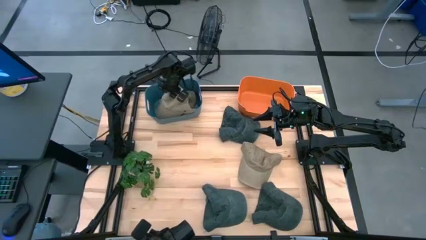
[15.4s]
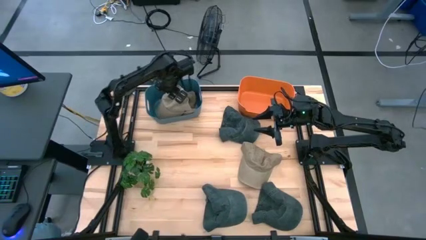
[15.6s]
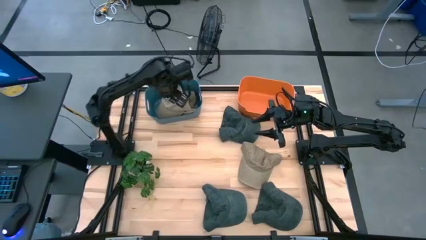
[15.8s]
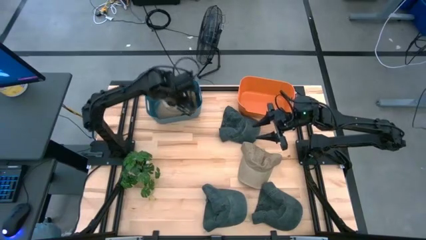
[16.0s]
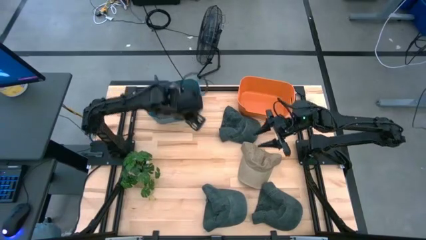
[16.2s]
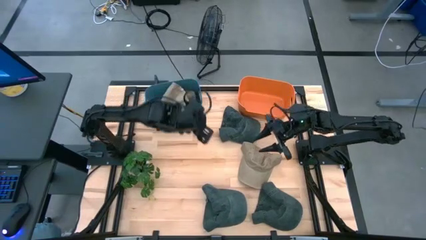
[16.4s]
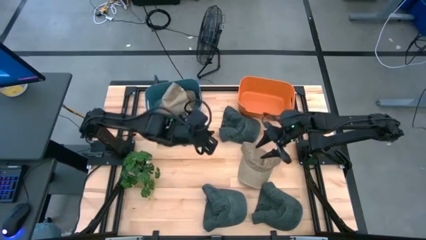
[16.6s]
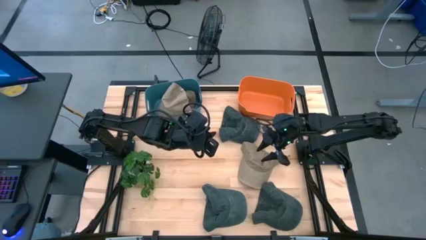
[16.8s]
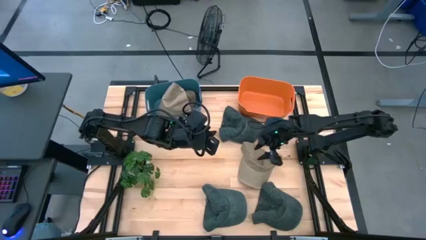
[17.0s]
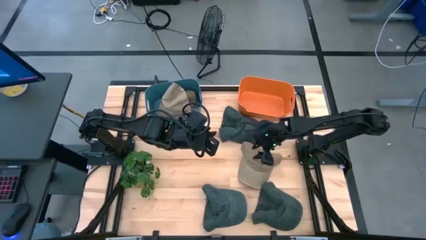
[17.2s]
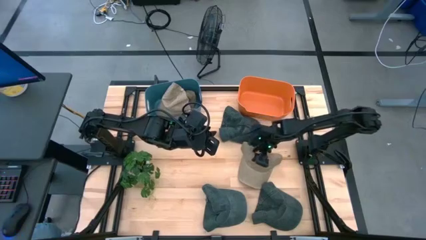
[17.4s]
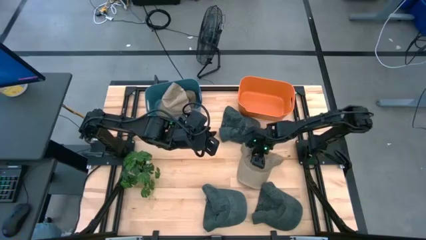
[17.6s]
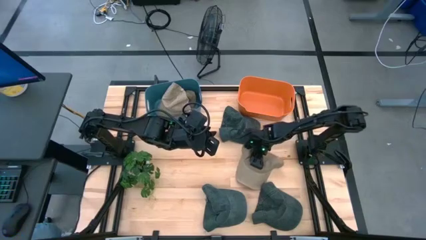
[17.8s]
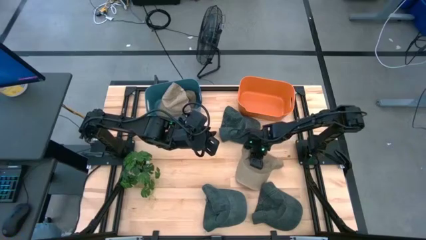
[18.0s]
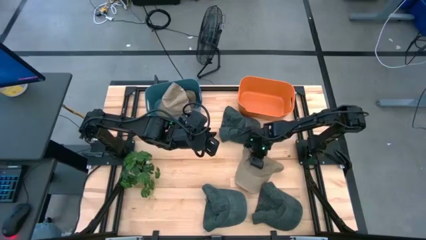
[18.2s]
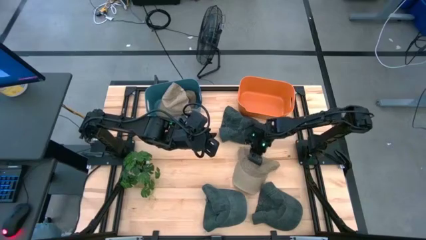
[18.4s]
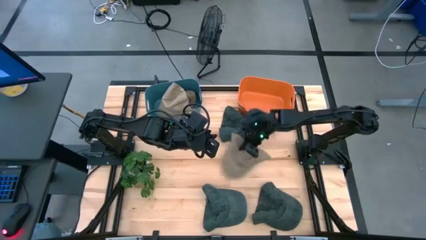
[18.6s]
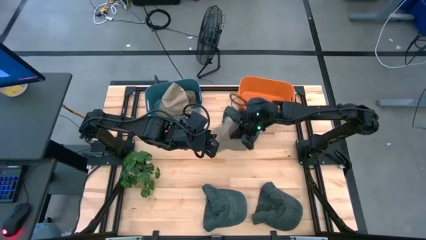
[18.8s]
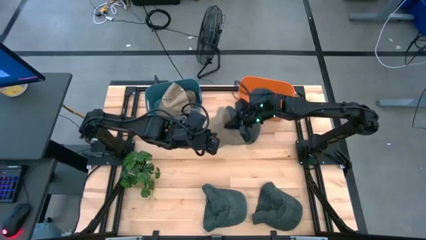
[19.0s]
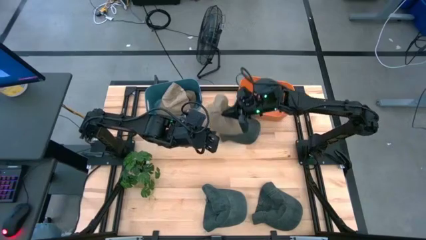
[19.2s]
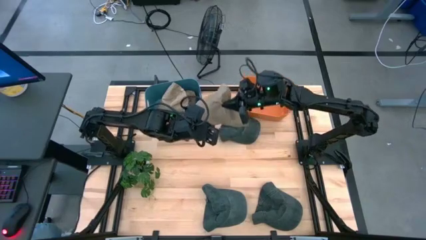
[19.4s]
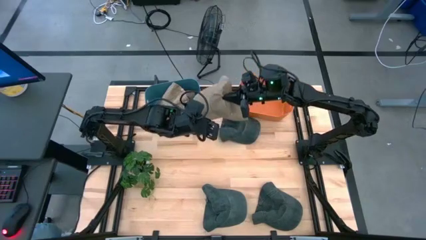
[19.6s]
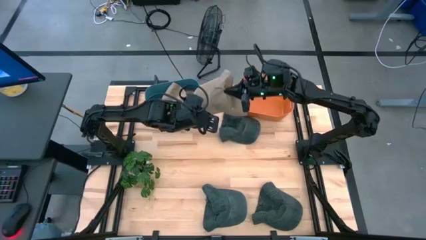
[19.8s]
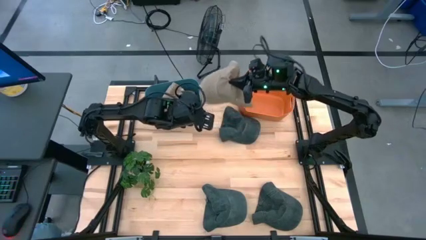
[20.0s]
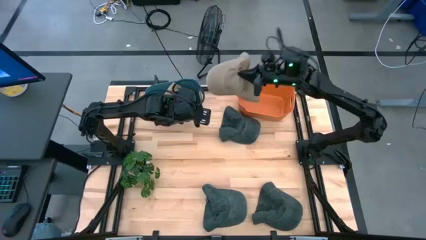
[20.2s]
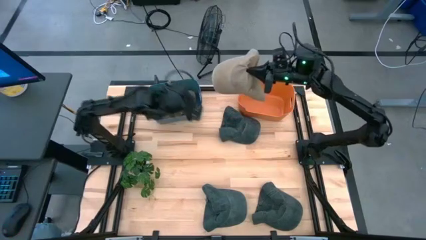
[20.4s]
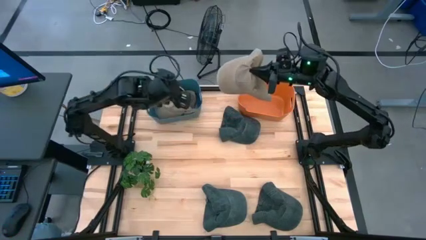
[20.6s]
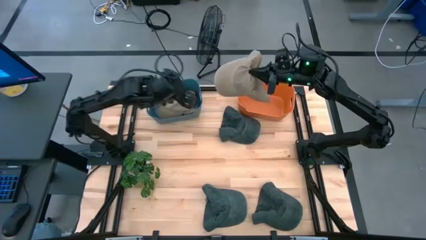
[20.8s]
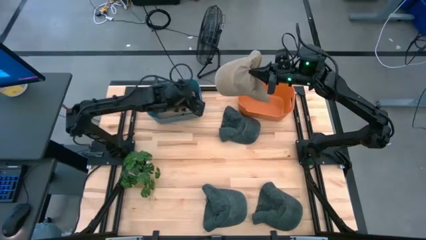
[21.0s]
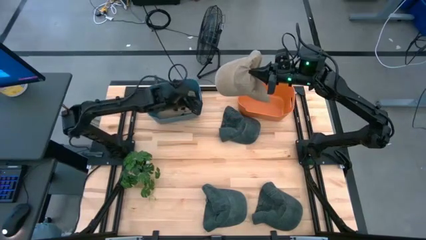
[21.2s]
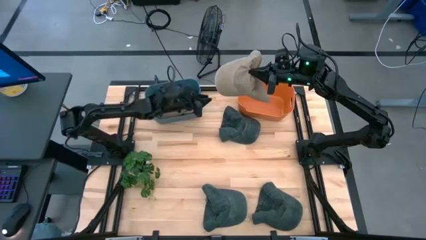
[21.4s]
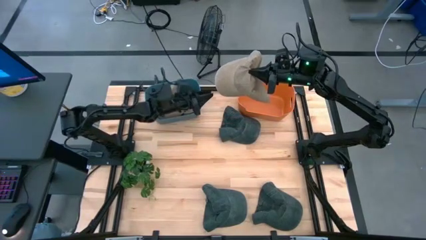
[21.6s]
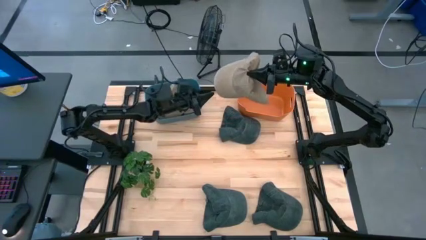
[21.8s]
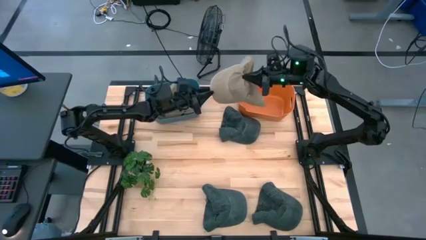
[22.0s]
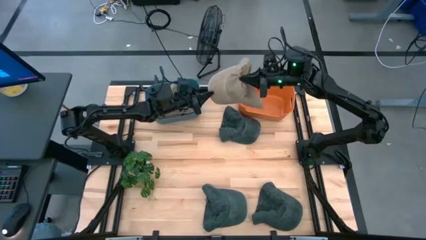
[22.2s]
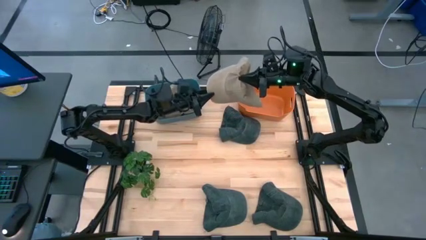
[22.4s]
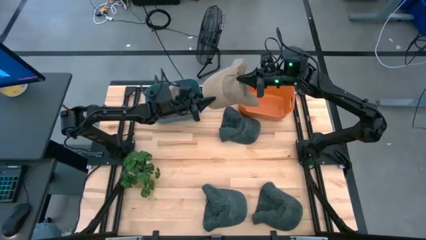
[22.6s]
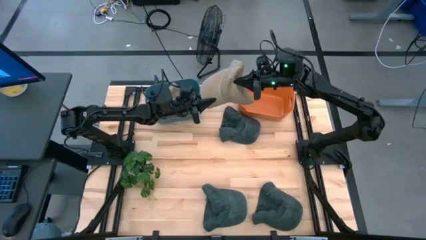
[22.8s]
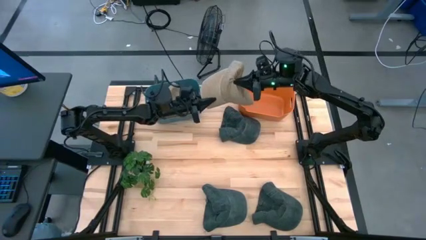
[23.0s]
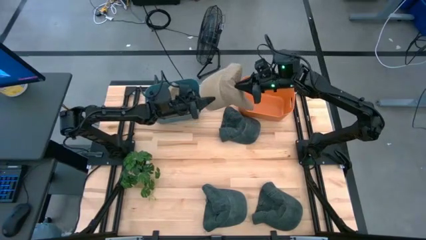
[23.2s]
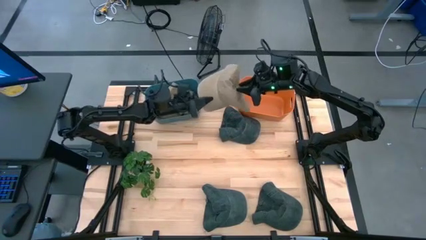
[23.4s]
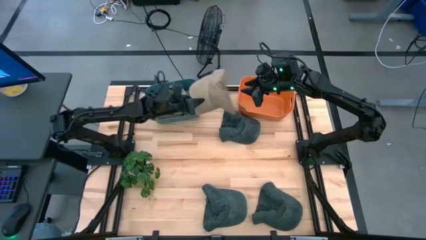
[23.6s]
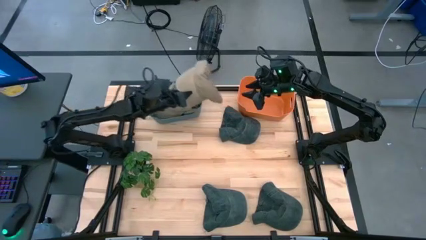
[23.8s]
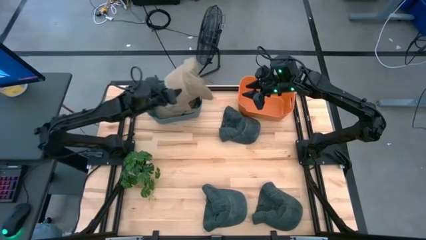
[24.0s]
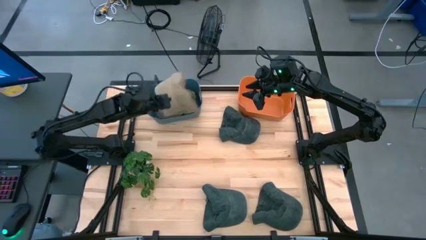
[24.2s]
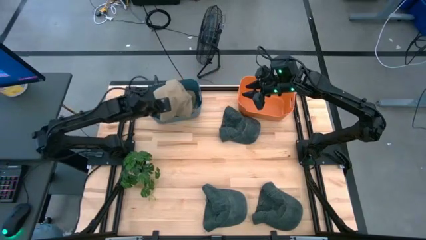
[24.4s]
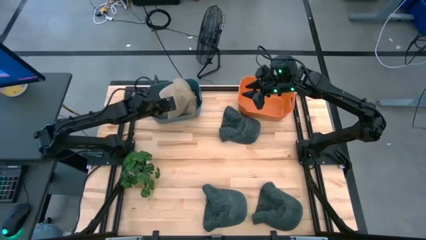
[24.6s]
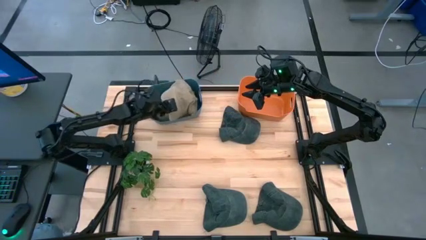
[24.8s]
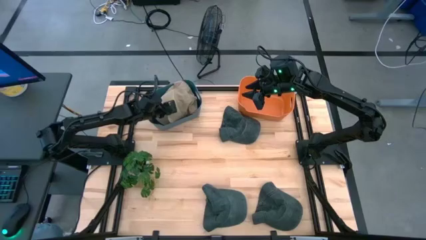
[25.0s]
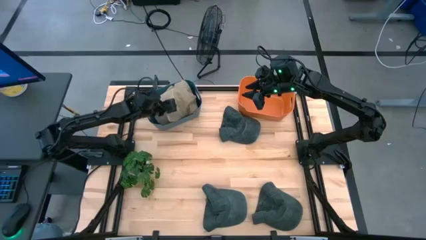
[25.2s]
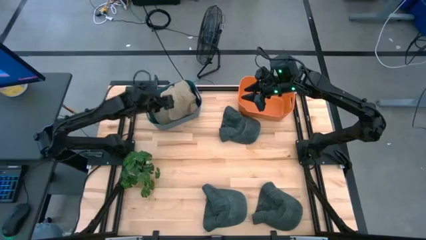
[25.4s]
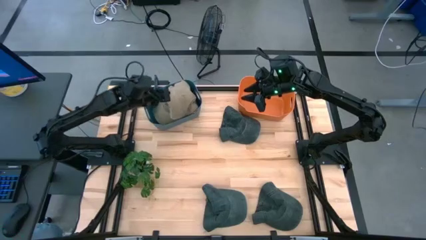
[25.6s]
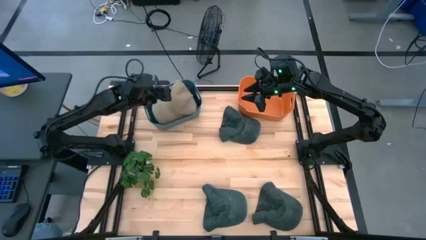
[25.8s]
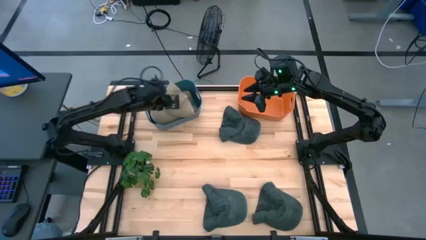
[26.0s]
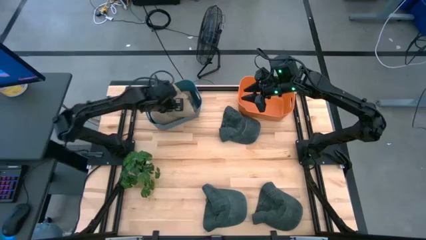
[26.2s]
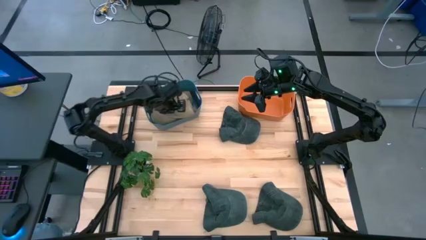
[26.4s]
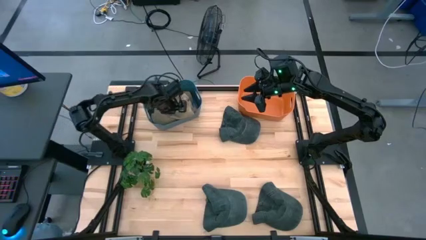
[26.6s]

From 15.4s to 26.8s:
Task: Pick & Place hat
Put the brown cap into the blue bin

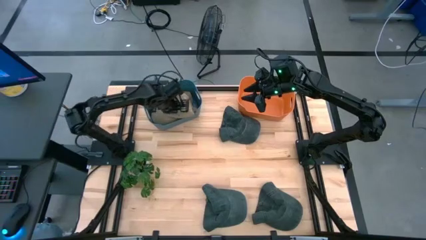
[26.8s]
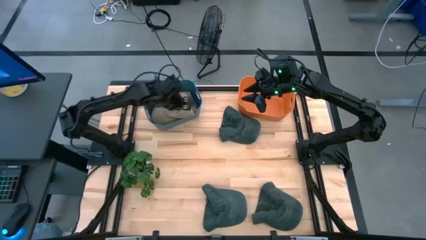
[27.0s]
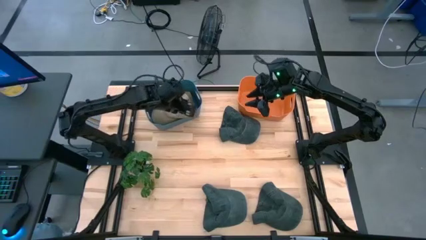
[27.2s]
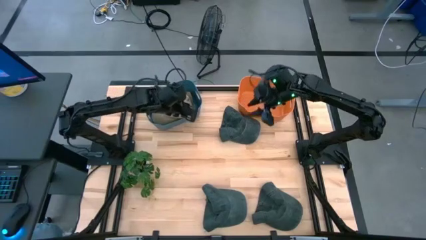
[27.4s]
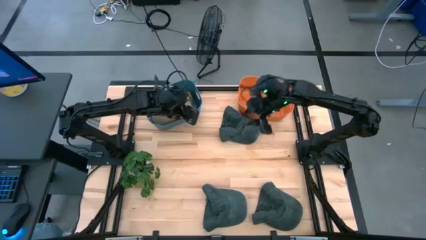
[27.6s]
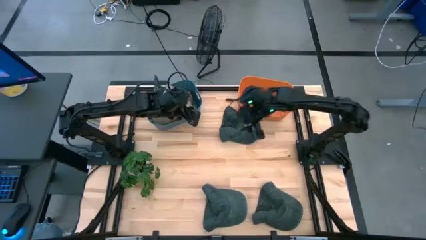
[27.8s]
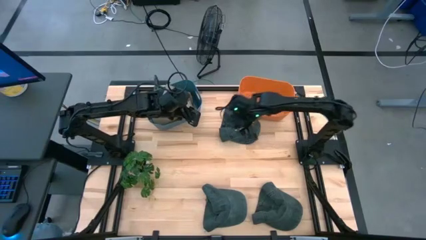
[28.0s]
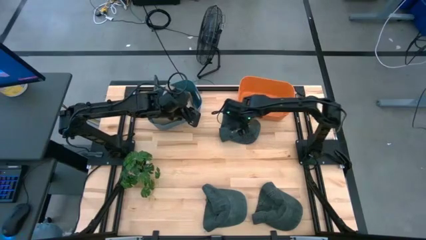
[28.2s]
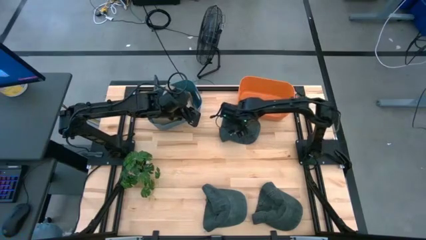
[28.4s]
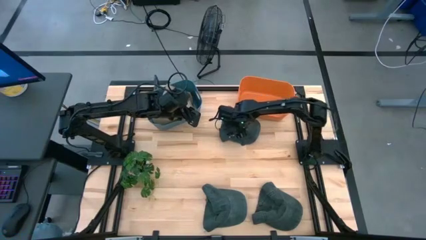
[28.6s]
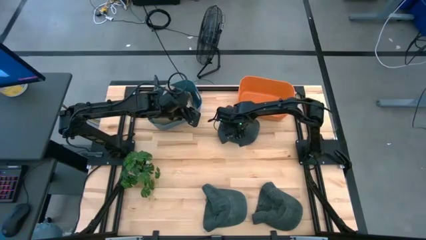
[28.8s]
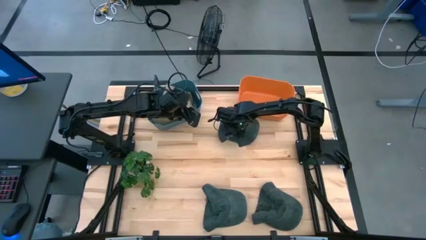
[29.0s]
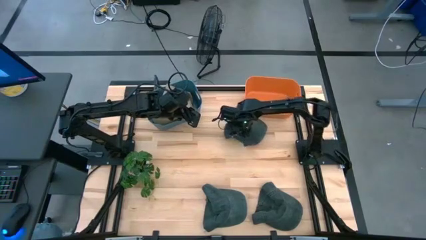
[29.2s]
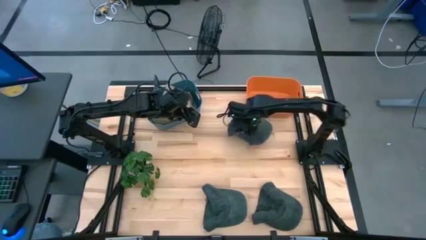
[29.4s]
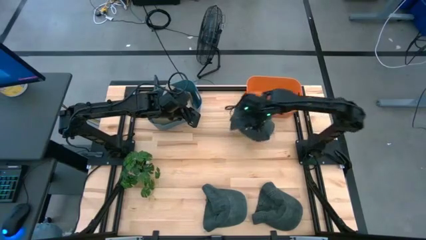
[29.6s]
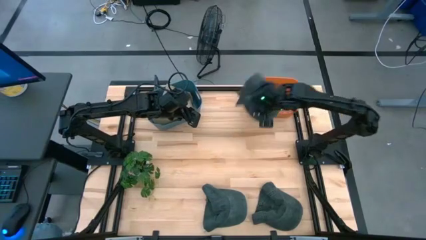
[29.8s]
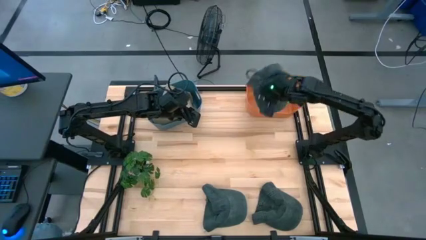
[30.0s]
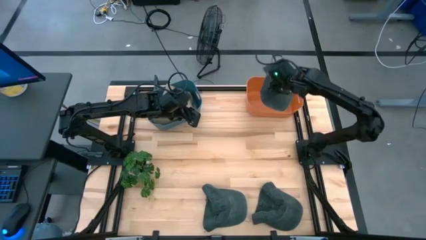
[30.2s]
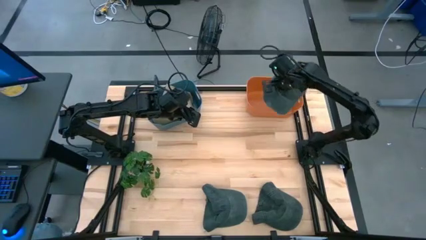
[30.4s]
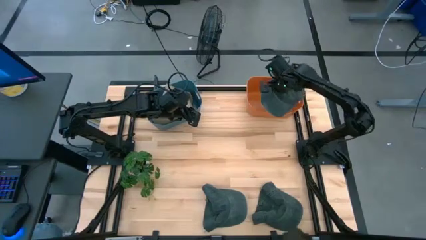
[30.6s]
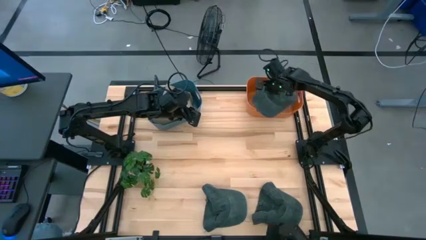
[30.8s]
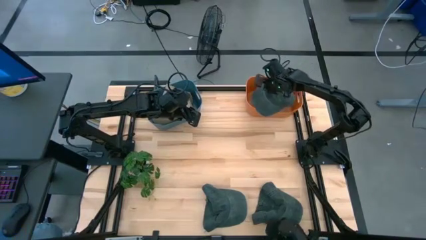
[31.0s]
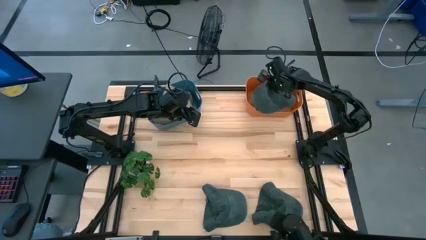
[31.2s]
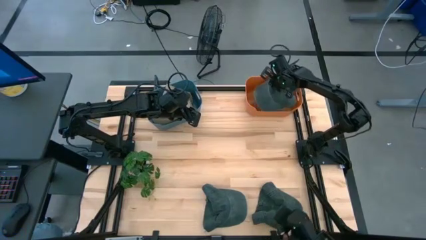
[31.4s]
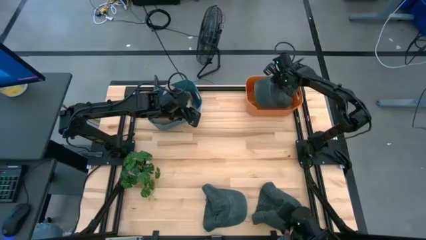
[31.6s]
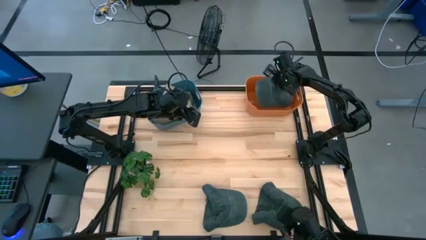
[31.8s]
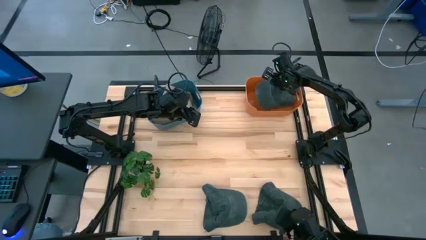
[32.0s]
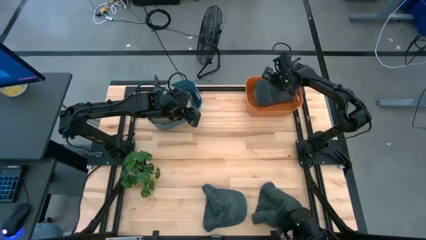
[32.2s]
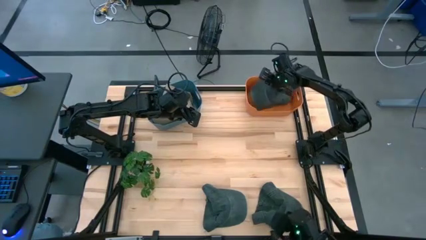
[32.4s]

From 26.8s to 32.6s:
Put the top gray cap into the orange bin
